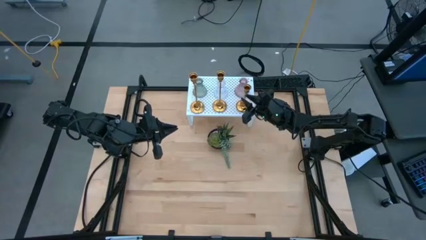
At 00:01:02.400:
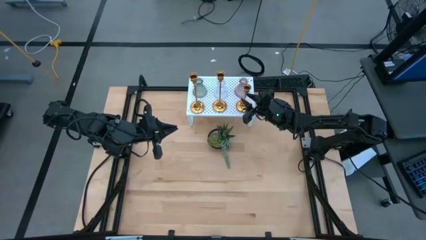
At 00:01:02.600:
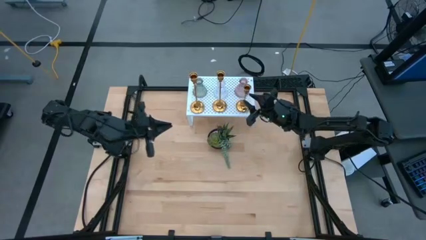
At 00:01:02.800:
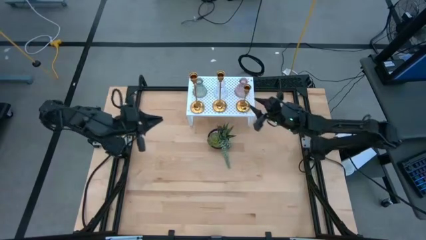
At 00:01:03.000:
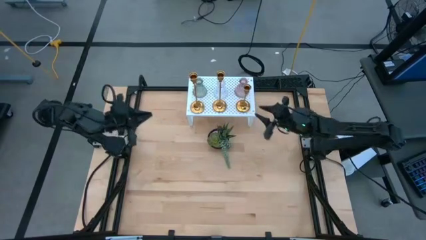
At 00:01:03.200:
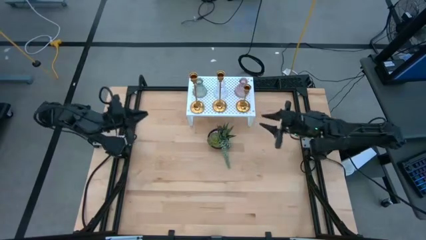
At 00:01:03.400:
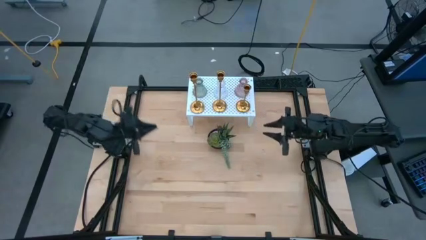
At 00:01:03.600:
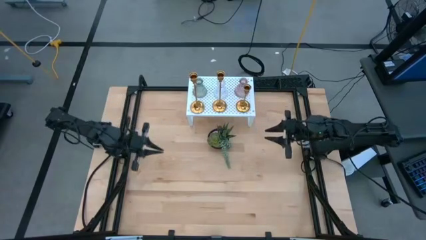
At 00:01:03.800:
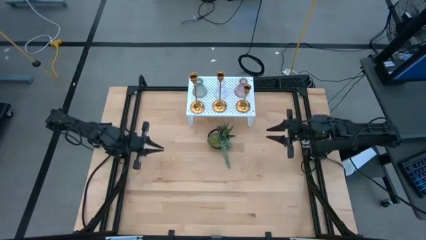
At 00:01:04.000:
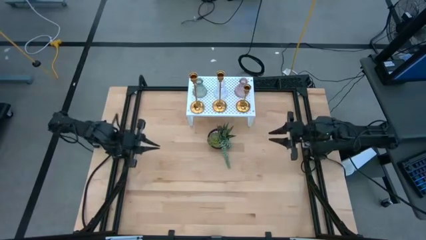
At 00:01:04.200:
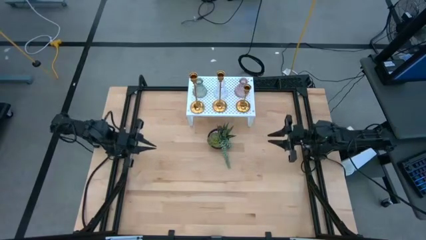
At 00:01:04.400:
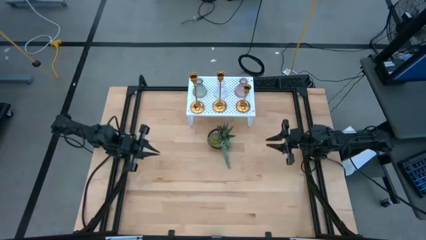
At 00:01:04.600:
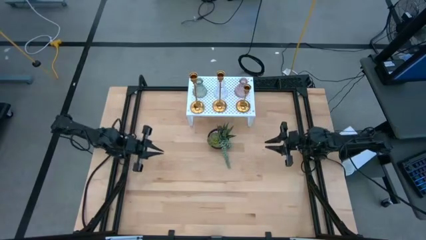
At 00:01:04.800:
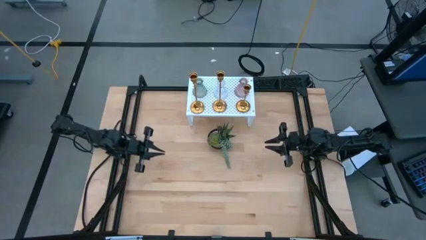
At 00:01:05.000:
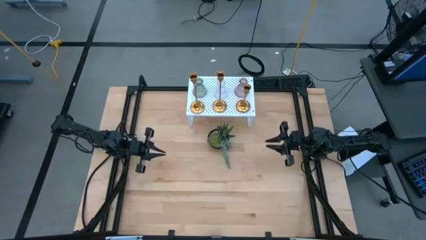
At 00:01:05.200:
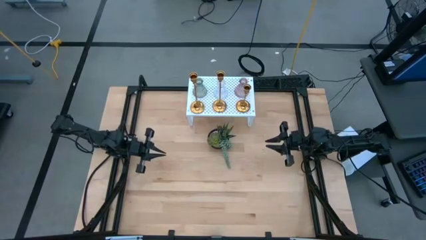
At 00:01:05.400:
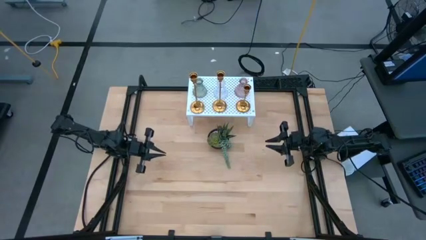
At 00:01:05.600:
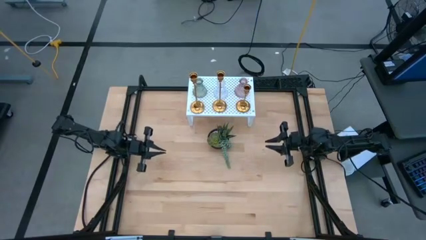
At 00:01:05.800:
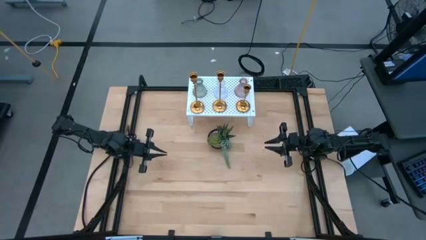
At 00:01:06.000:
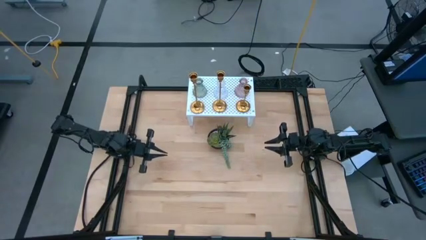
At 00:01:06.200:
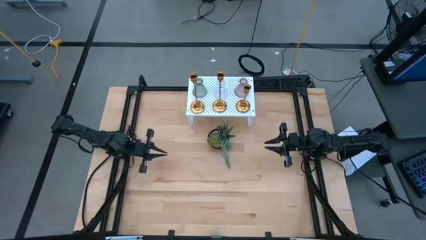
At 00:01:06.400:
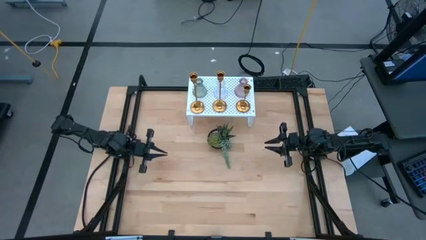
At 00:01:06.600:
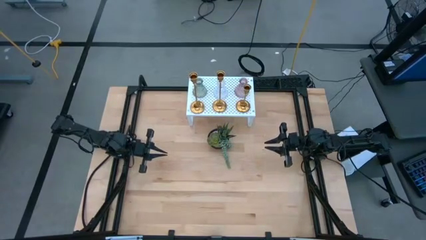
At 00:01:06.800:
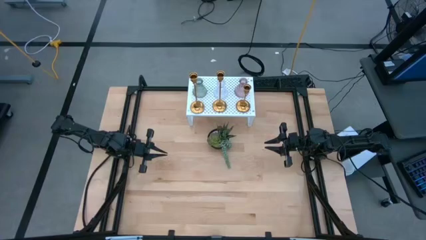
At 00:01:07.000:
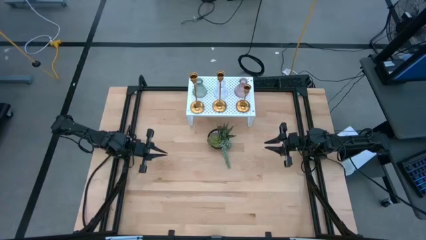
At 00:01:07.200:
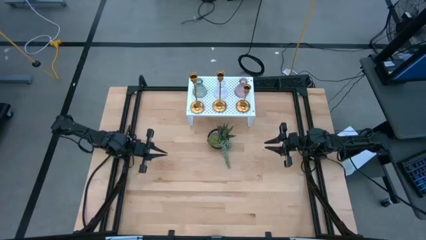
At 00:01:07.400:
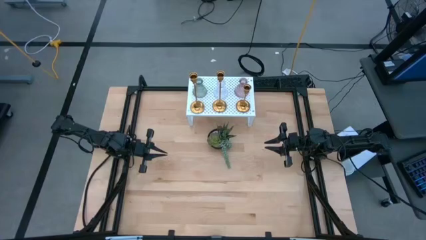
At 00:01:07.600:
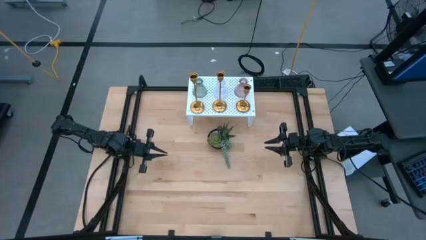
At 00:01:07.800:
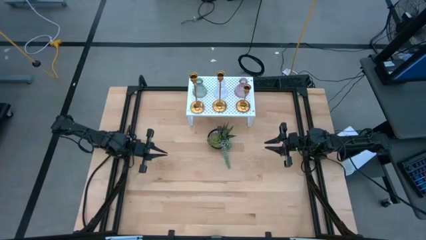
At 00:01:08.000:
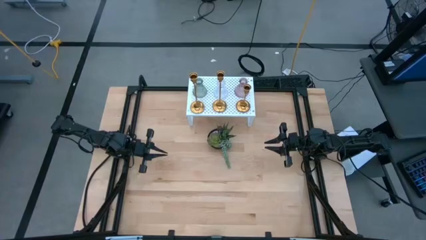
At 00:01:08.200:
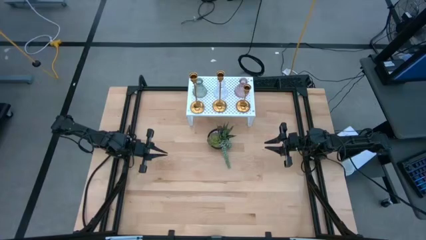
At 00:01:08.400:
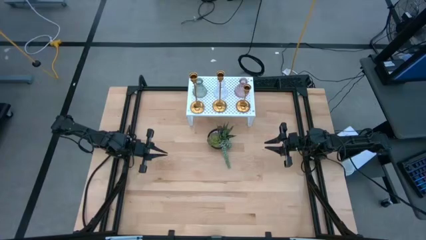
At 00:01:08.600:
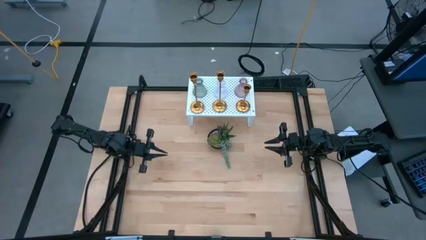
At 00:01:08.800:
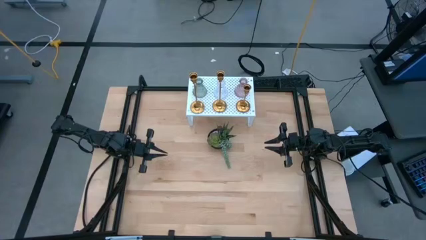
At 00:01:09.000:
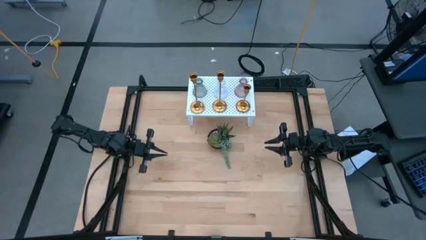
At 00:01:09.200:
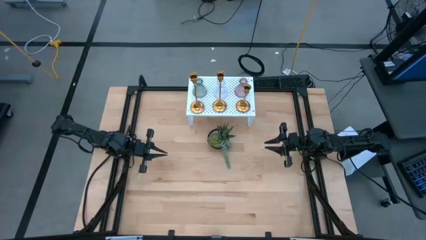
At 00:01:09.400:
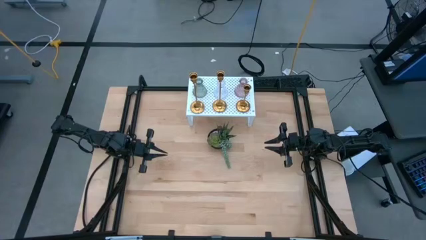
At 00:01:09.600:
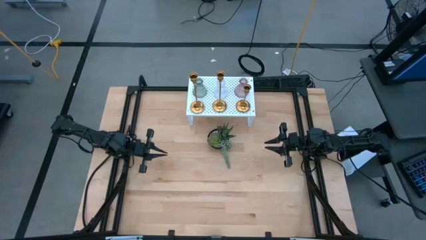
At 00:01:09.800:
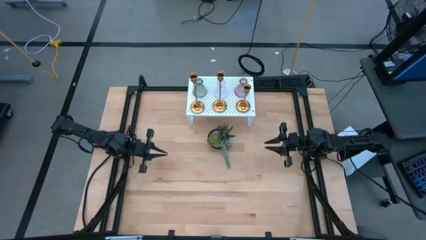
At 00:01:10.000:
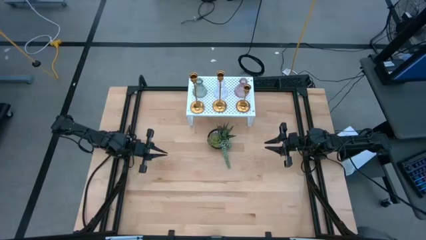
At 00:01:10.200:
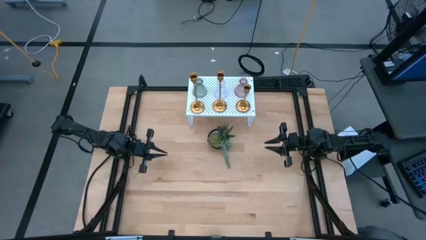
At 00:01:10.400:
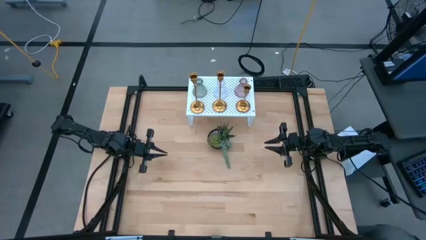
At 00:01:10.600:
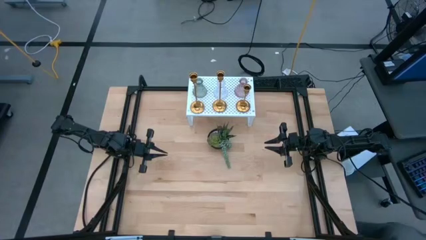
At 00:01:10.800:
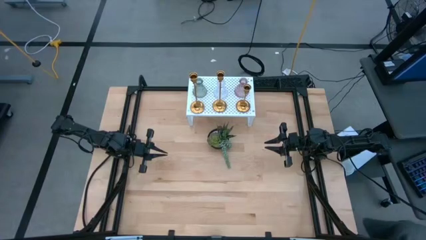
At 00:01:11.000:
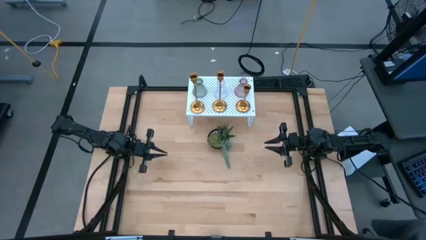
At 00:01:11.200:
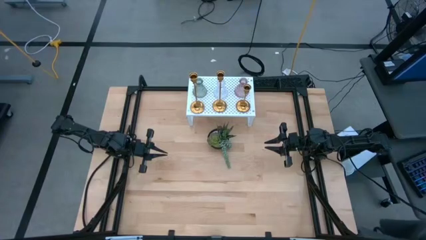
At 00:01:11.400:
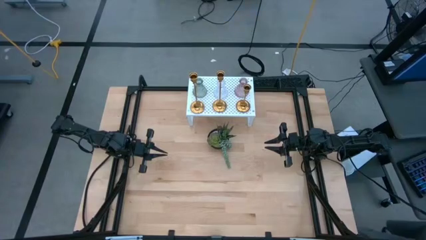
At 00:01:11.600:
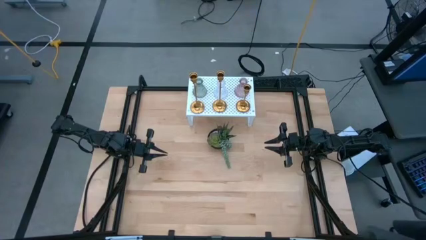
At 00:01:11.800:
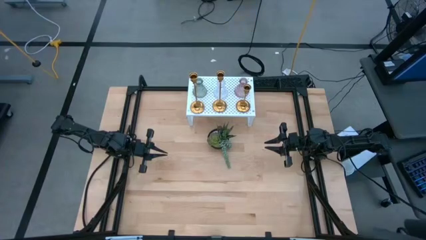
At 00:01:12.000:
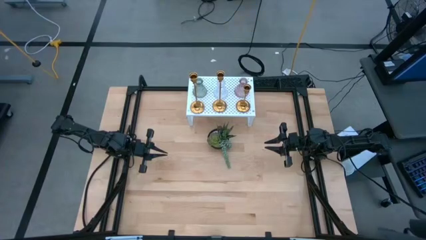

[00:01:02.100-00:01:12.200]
Task: Pick & Place candle stick holders
Return to Home Position

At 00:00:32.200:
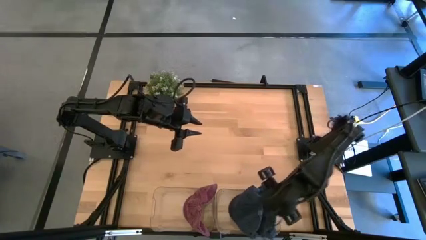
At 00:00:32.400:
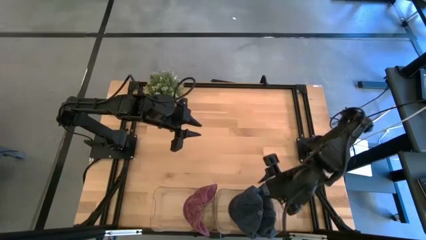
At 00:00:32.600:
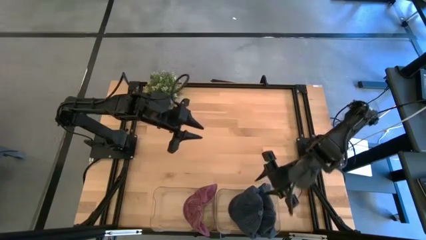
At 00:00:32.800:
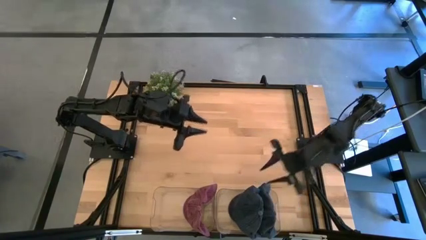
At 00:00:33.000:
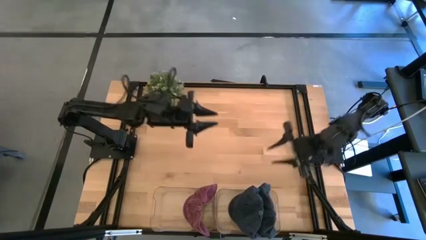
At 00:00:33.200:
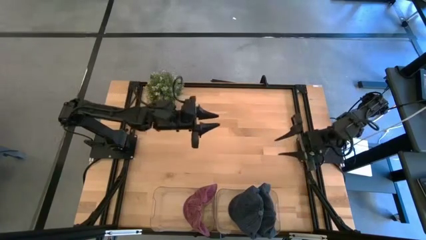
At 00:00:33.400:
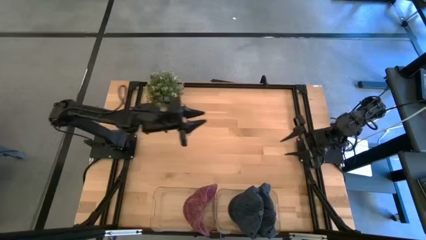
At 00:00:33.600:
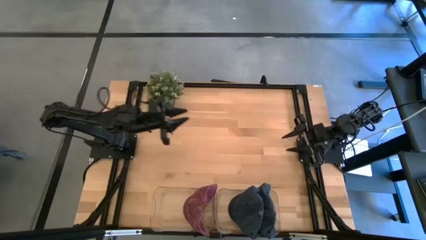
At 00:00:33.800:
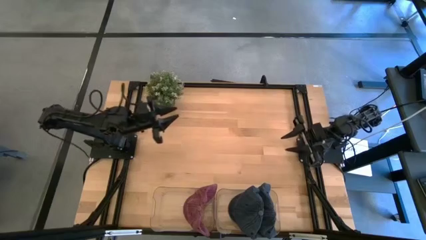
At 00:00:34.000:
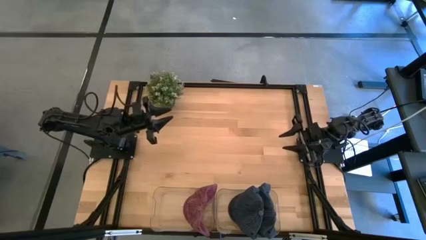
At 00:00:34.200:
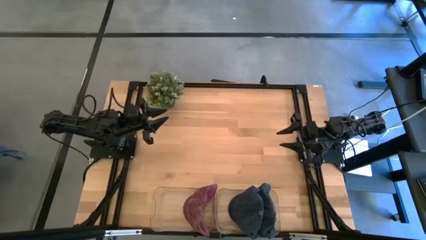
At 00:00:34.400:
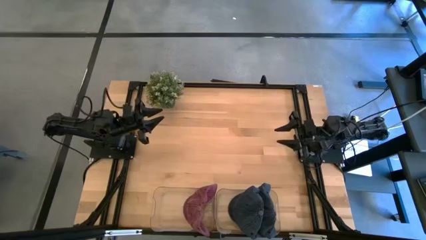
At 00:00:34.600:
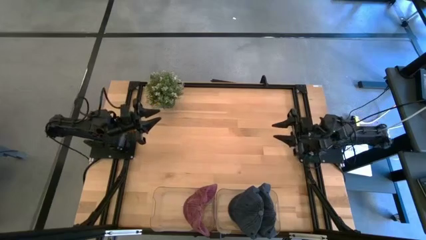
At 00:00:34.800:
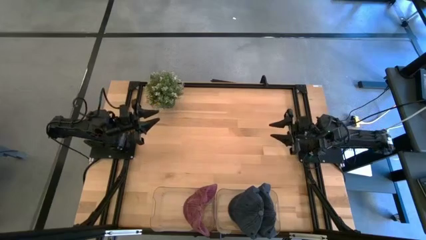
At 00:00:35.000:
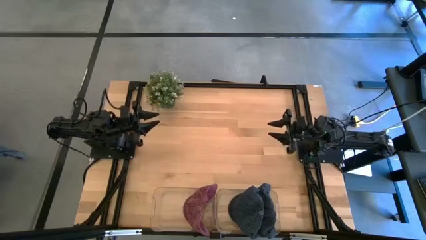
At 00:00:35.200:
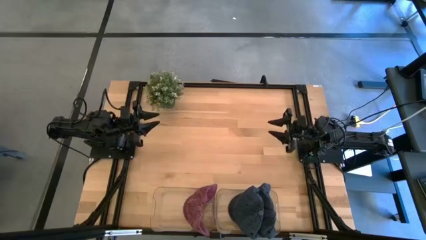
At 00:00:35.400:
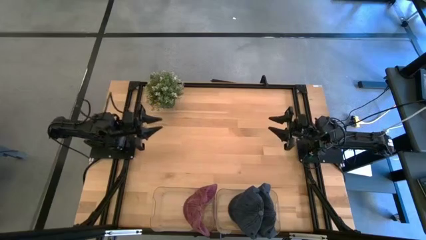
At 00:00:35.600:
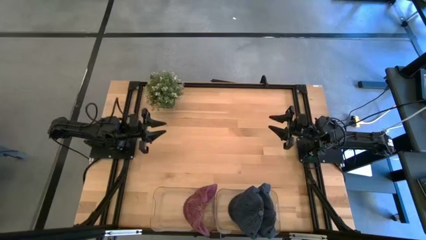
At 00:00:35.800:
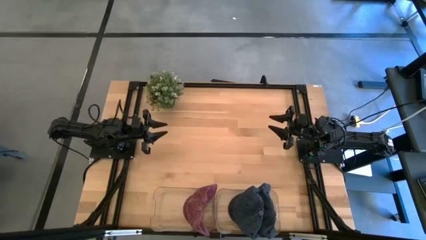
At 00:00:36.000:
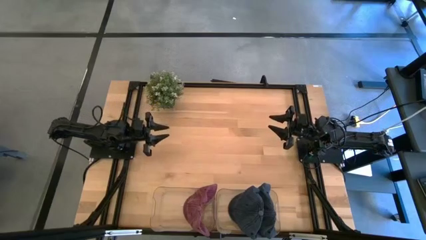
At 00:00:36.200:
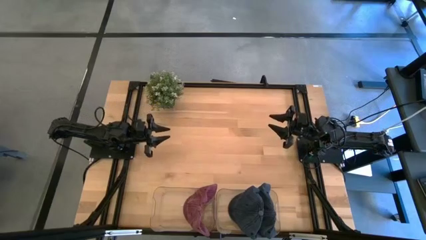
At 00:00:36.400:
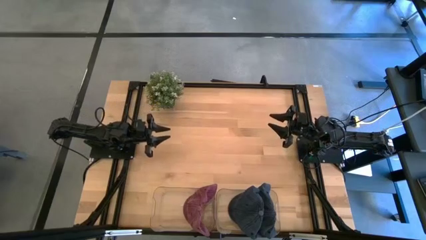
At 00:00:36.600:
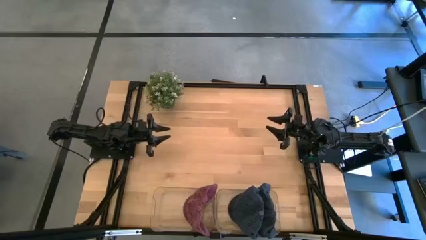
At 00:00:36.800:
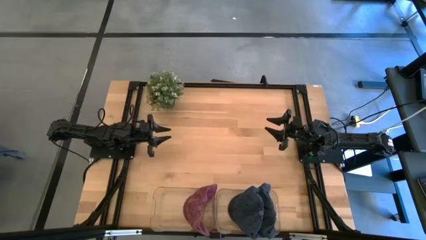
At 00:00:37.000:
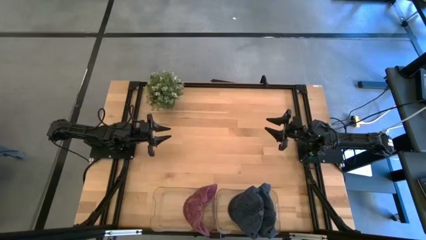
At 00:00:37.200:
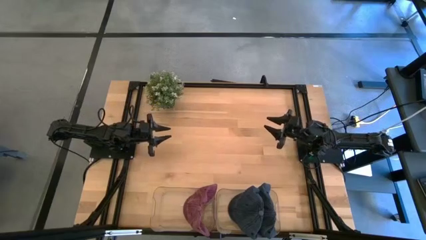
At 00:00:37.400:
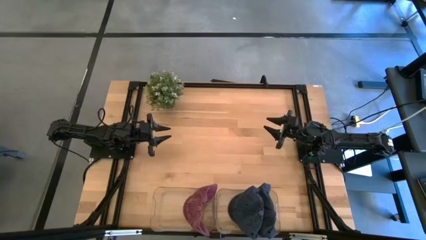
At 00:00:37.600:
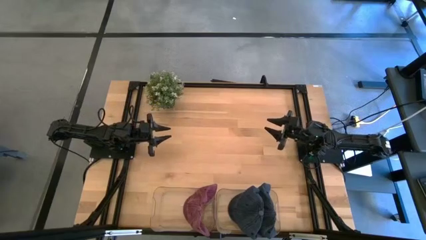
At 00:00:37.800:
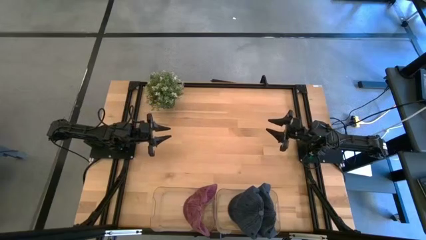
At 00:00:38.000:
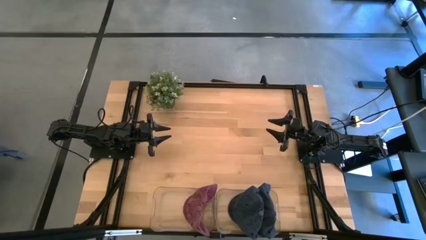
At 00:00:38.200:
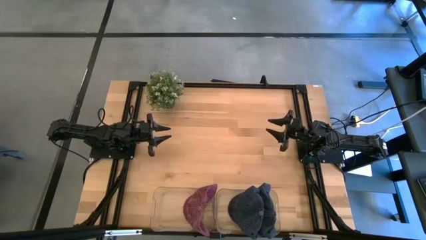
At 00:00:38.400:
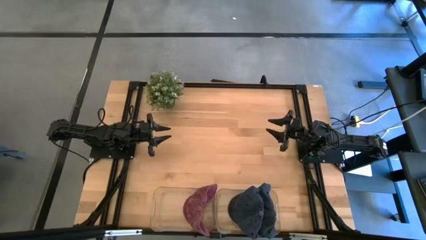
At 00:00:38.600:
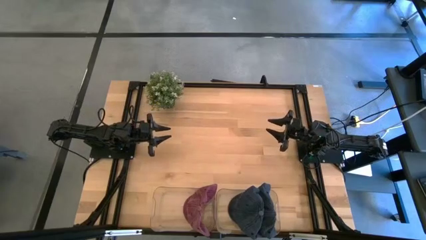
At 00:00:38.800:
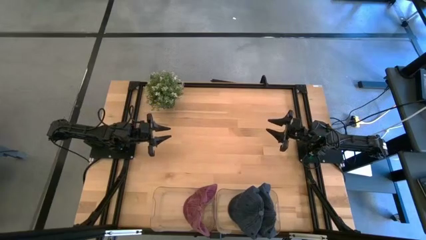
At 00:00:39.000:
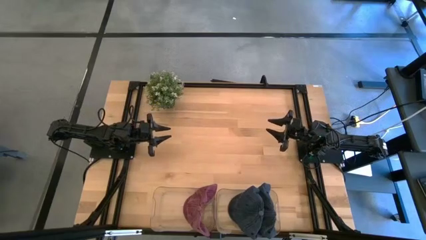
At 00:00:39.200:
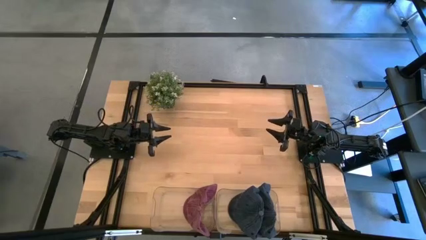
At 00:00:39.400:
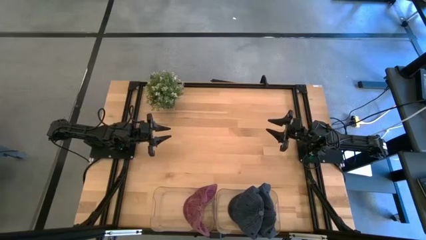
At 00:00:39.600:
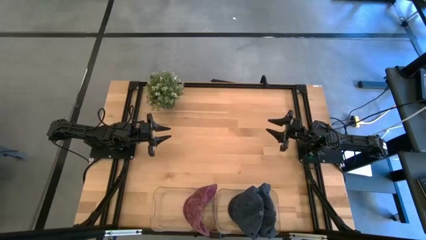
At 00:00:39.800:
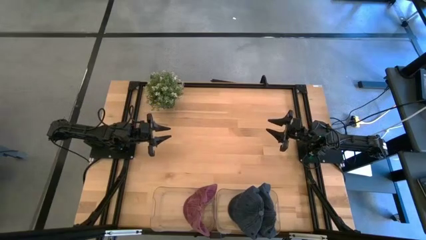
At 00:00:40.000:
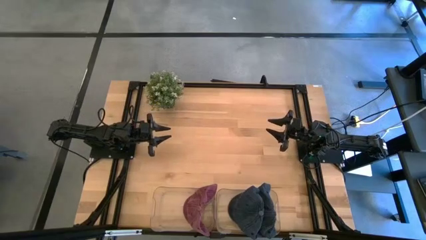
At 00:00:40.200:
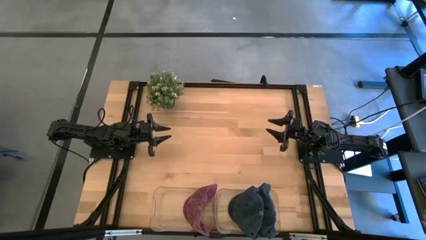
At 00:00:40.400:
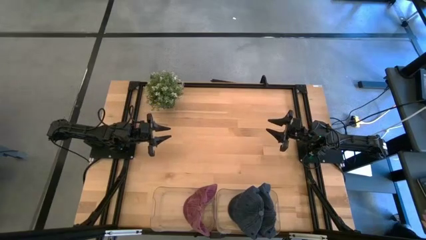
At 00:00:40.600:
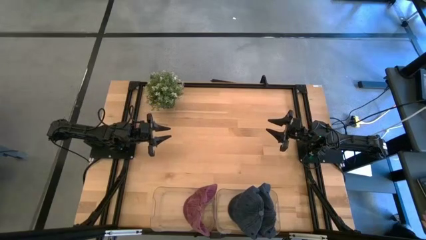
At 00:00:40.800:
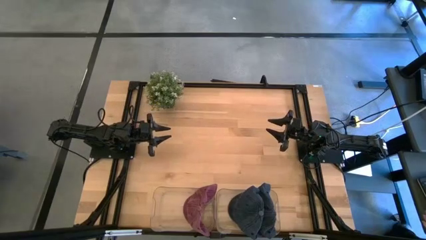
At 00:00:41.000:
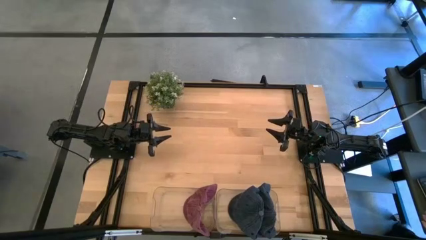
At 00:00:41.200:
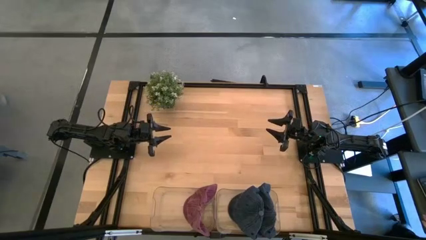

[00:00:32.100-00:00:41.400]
Task: Pick & Place hat
Return to Home Position
